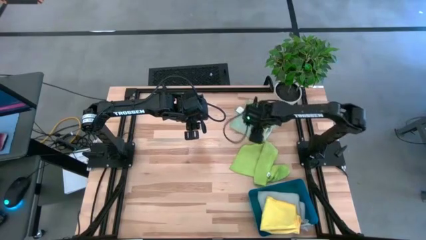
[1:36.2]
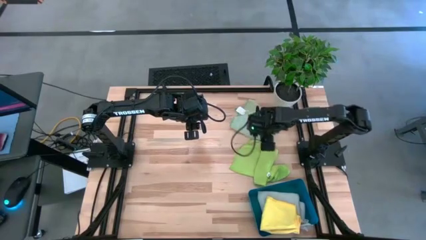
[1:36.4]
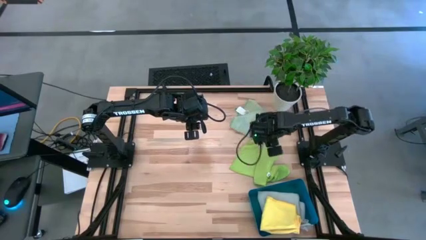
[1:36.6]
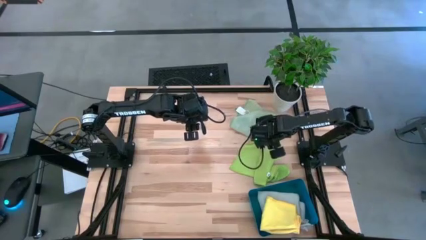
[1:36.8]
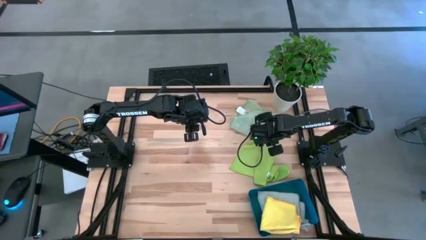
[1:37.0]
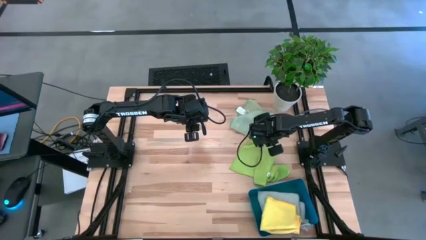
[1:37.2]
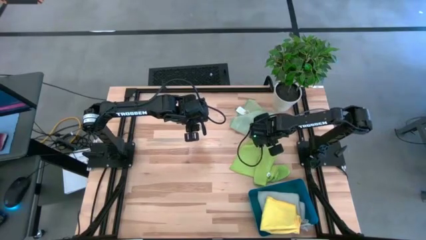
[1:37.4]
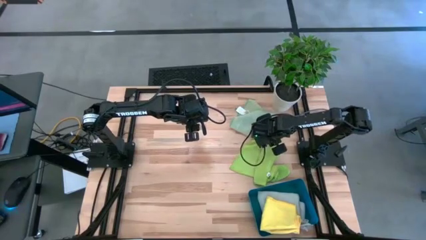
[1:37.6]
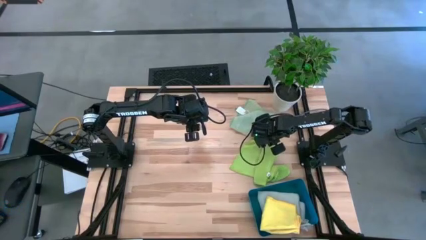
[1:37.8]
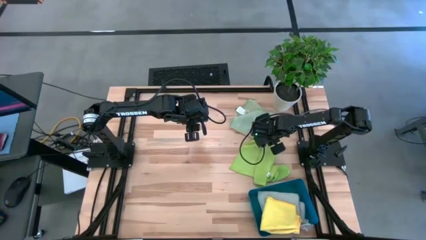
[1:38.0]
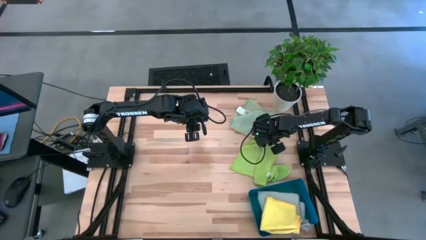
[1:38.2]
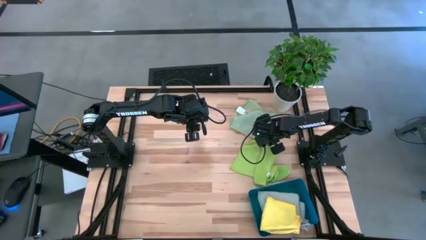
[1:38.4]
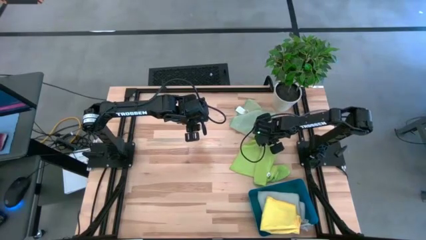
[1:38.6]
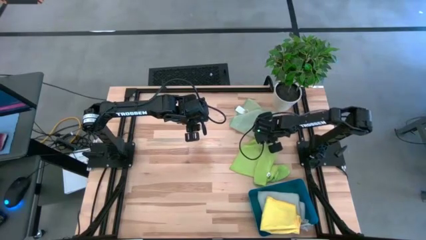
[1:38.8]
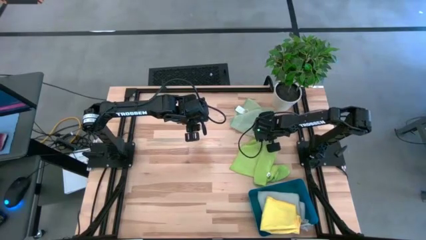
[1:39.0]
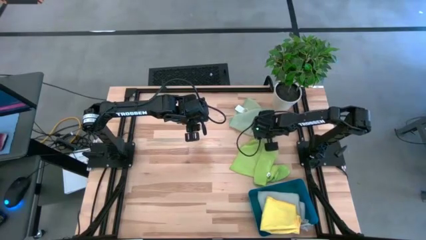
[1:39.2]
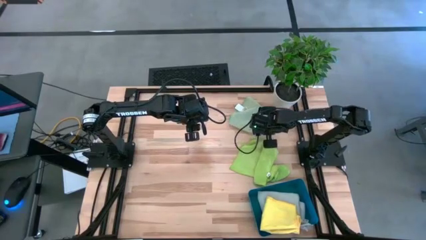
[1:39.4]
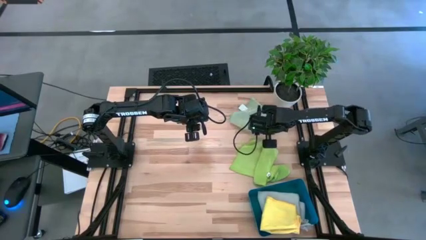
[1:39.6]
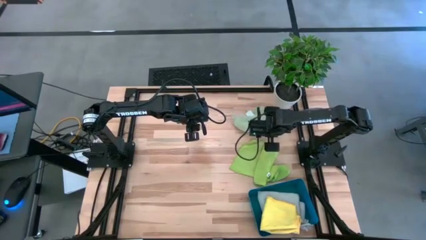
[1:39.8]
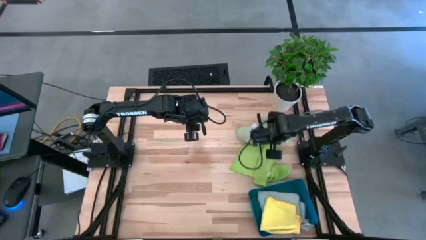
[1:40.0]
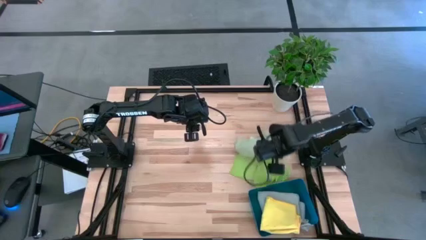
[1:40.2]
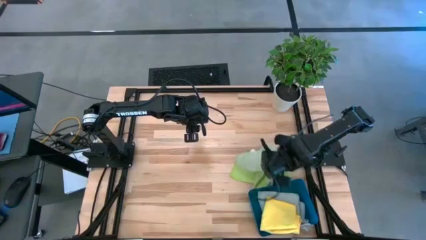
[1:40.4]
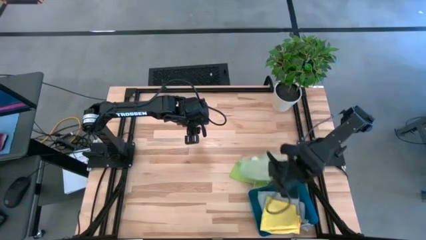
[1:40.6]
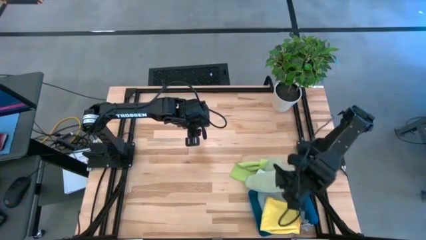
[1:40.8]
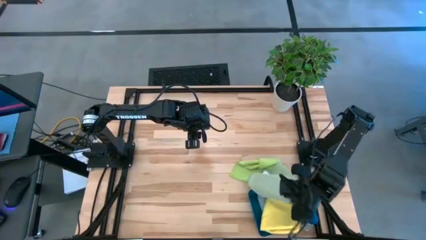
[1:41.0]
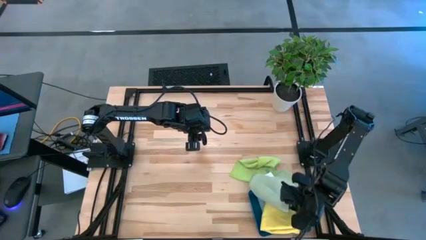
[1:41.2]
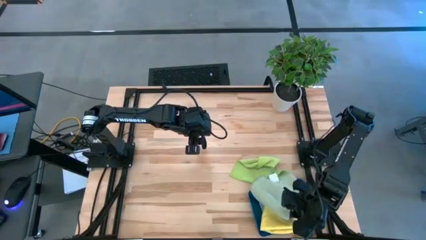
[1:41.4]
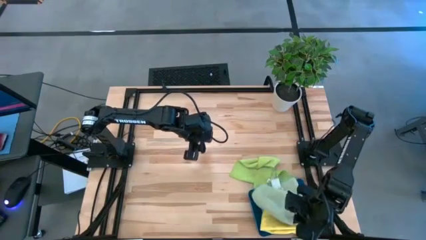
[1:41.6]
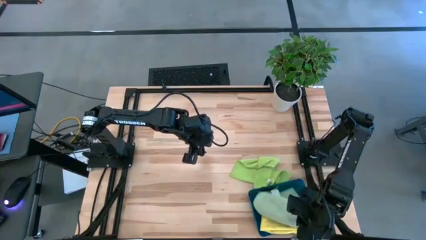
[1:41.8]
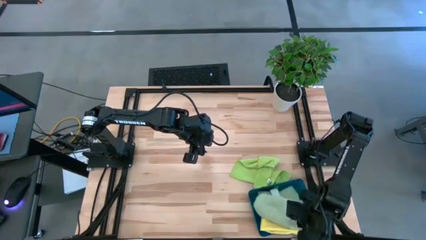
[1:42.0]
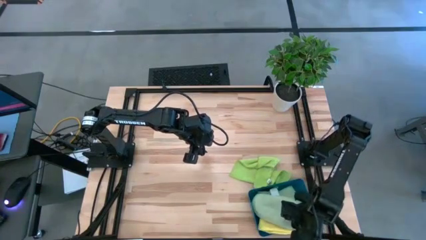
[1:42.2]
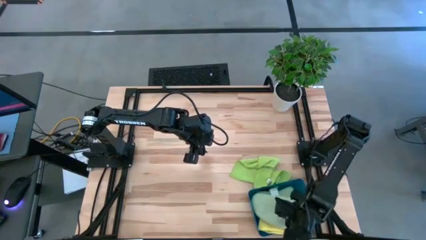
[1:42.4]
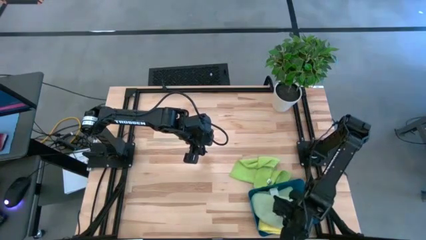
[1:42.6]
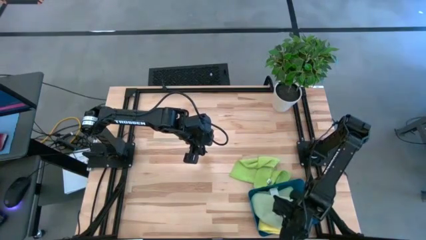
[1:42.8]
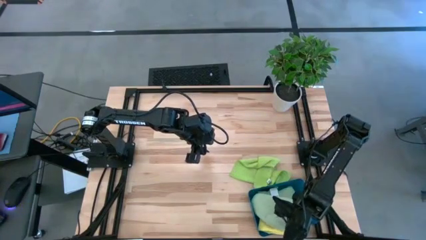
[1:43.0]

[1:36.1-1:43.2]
Task: Fold microfiber towels
Put the blue towel in the bin

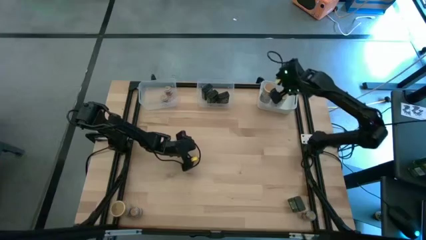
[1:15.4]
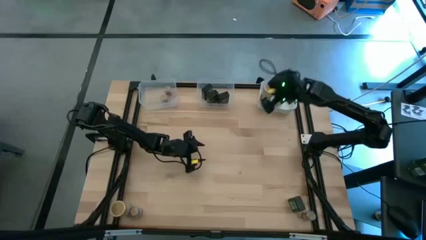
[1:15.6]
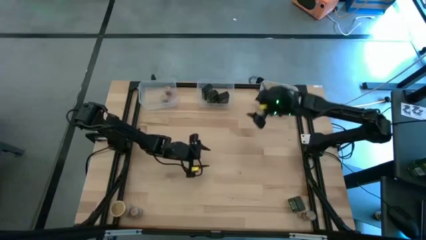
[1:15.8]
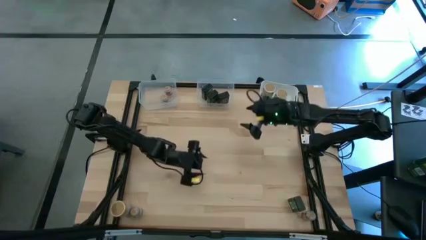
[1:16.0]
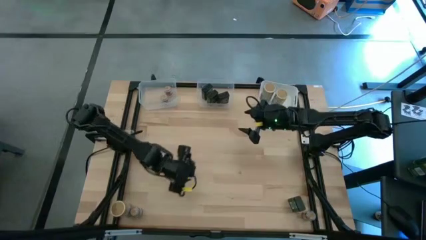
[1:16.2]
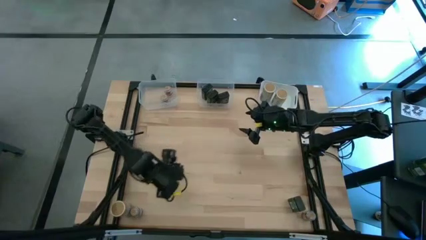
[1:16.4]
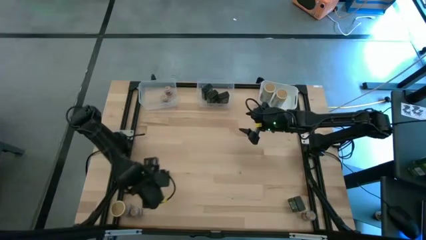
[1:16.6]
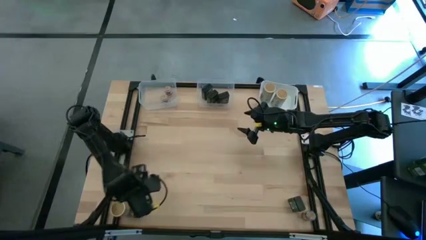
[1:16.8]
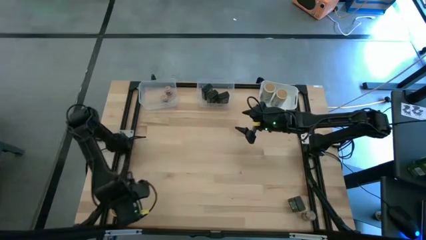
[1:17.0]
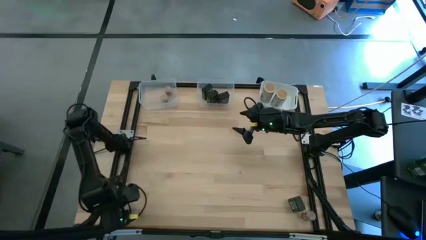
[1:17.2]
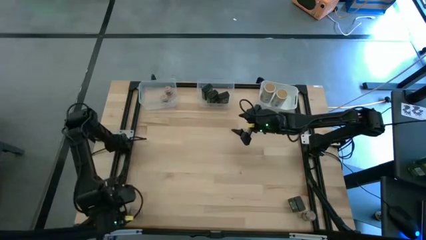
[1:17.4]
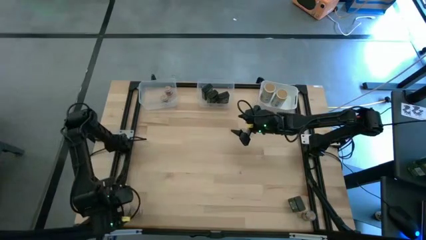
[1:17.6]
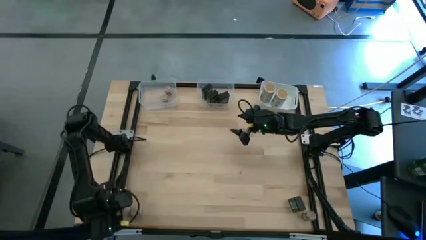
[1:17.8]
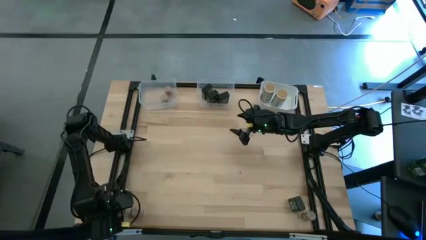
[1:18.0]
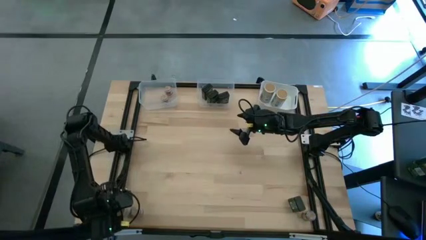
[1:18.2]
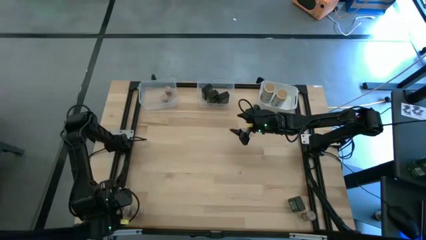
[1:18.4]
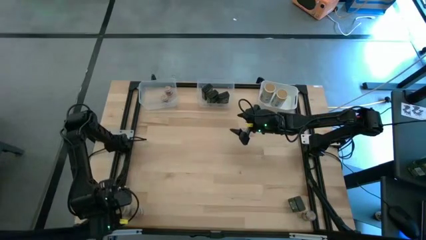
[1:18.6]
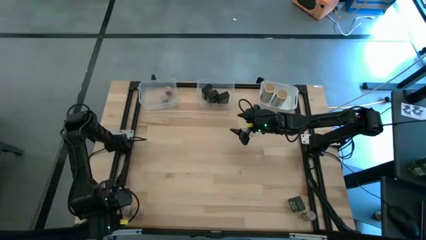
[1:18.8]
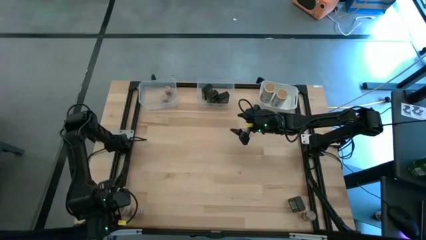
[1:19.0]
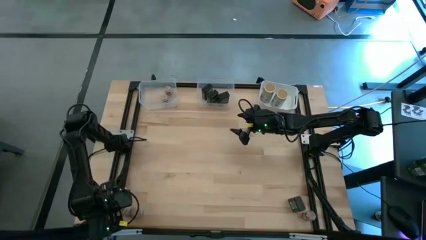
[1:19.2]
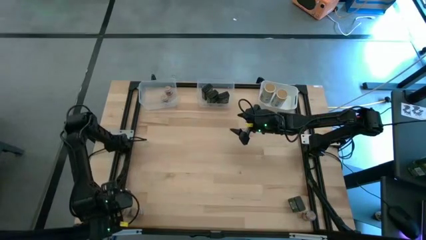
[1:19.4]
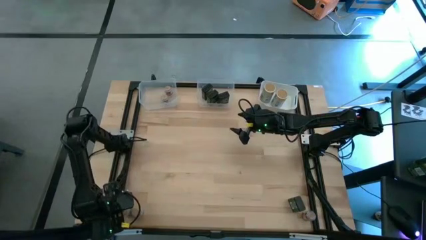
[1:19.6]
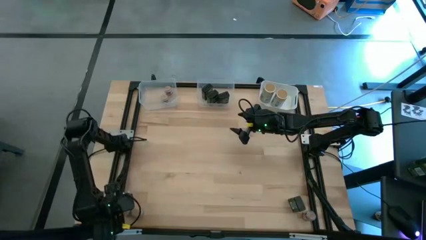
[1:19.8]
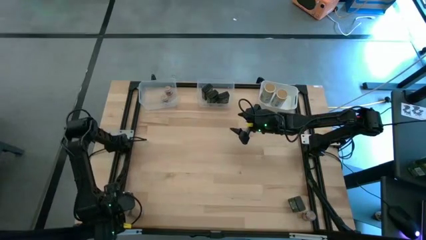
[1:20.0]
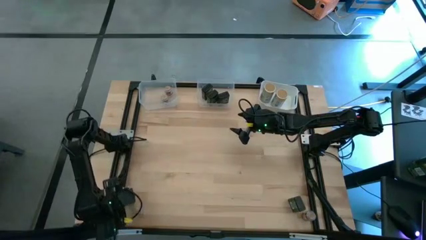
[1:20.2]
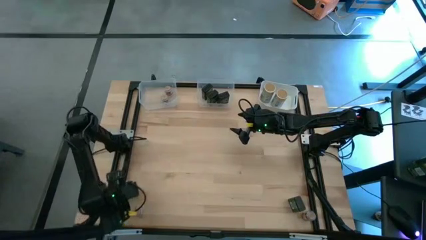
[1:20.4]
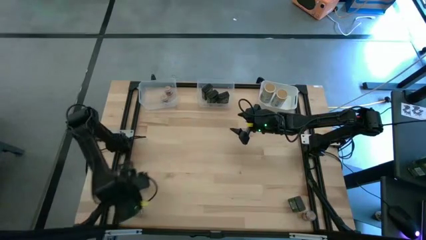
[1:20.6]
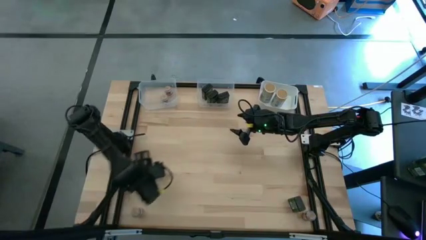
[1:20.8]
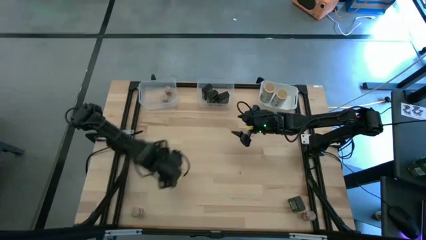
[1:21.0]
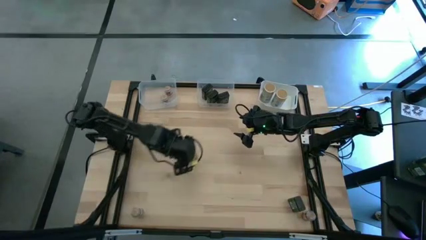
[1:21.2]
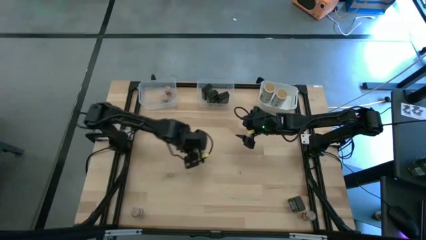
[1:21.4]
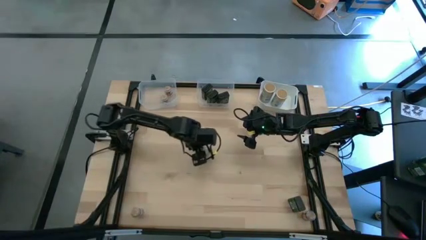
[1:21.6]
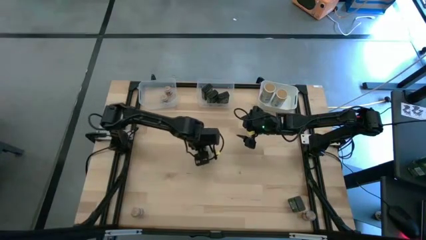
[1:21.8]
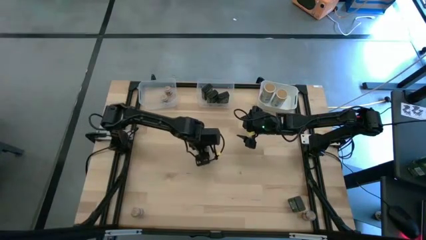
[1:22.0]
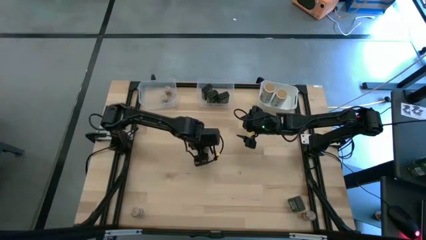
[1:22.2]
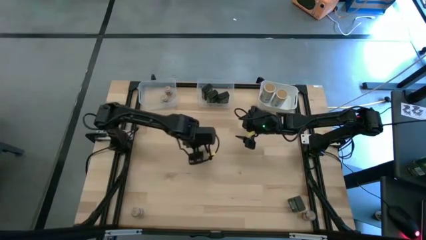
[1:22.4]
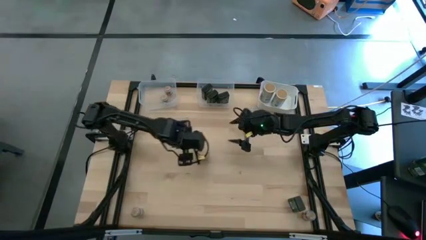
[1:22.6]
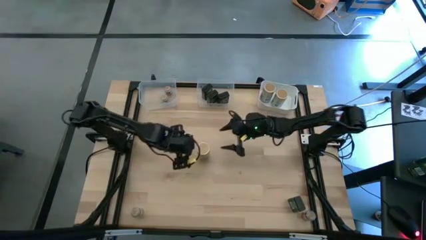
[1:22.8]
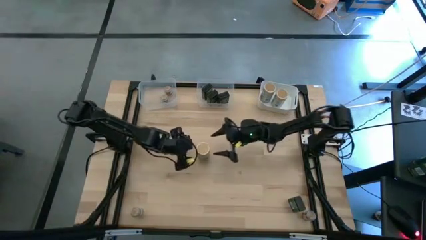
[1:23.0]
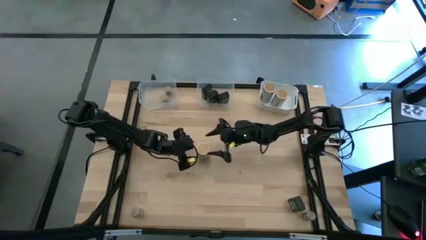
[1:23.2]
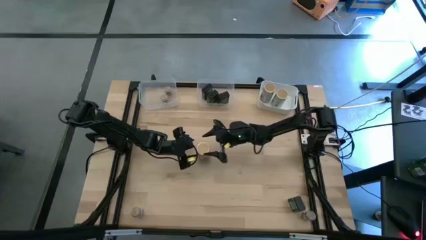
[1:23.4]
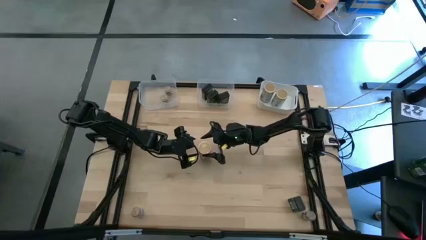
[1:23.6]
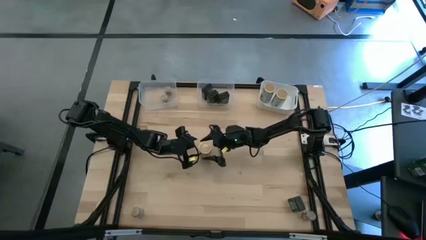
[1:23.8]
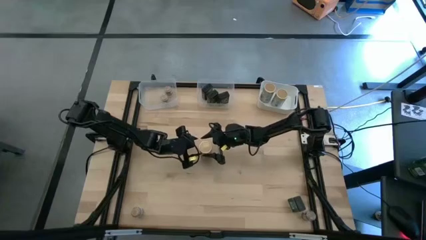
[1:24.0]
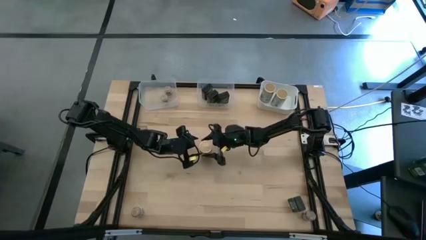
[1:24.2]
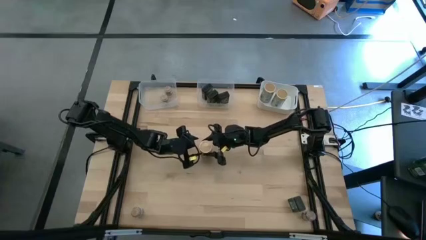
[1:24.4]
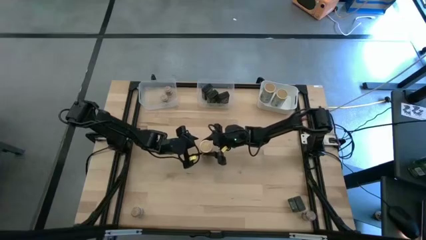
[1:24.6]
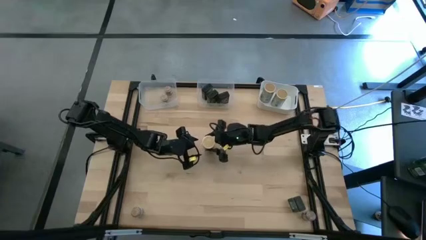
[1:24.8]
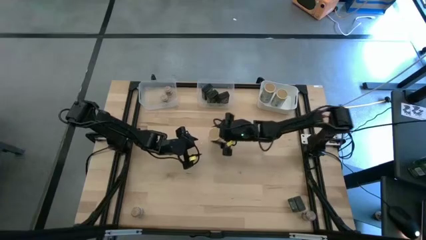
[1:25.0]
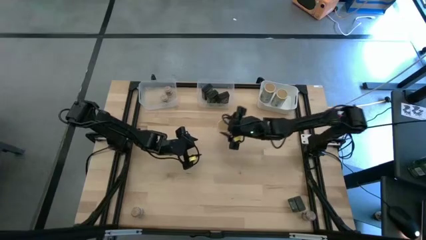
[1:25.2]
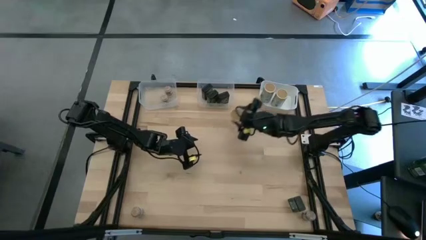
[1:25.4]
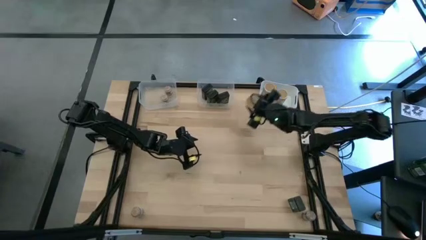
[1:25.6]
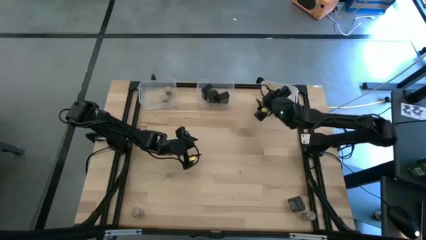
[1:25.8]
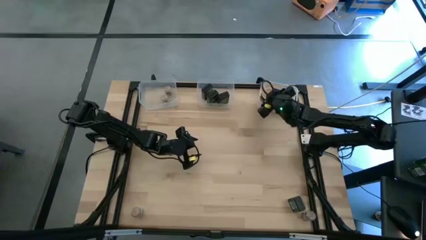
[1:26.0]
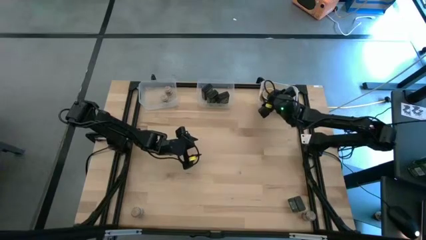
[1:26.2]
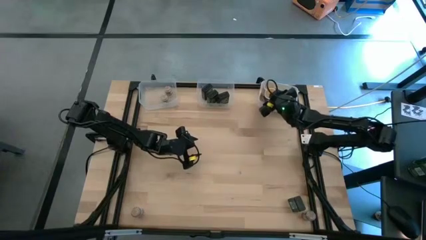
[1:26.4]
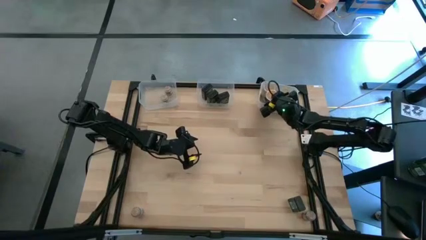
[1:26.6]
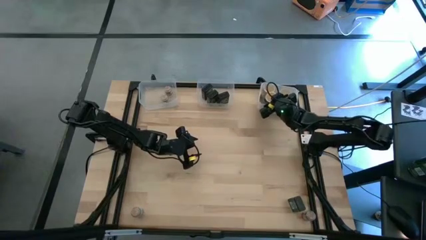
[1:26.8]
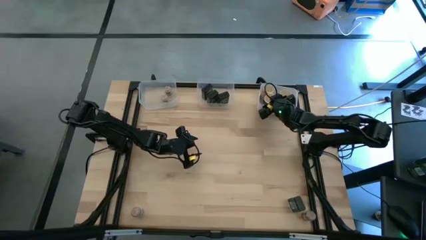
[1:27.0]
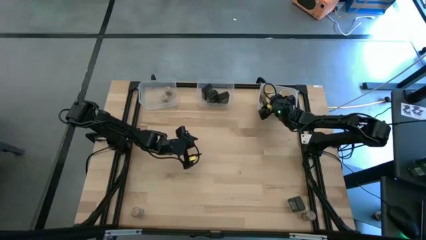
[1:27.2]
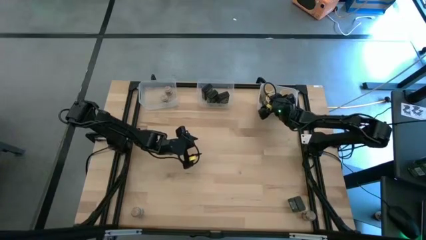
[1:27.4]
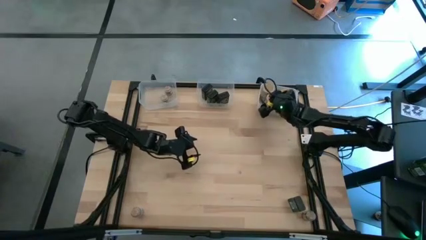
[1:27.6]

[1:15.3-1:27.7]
Task: Sort spices by type
Put the golden seasoning bottle into the white bin
